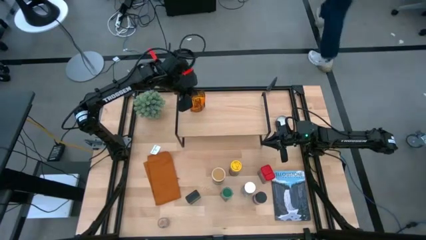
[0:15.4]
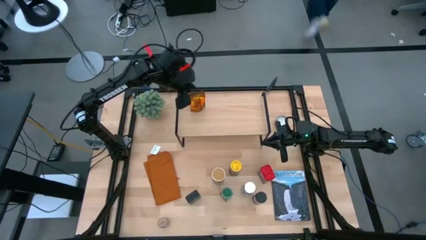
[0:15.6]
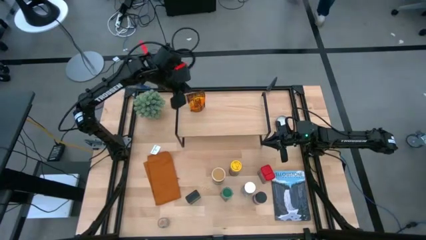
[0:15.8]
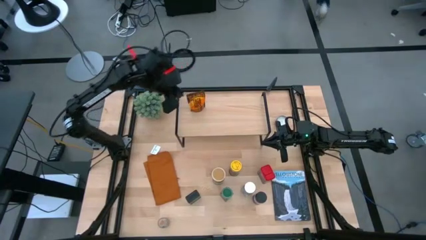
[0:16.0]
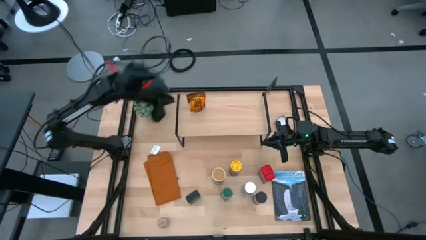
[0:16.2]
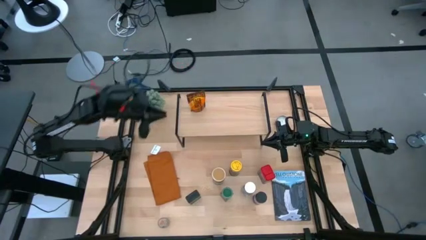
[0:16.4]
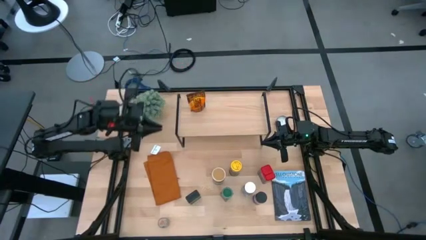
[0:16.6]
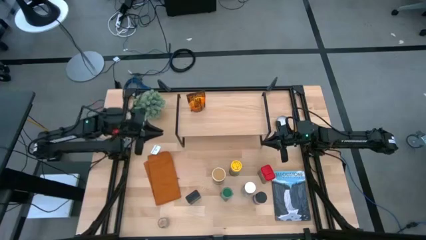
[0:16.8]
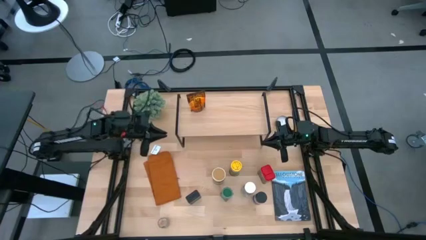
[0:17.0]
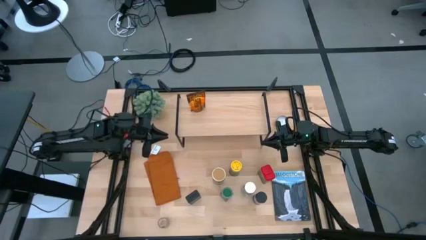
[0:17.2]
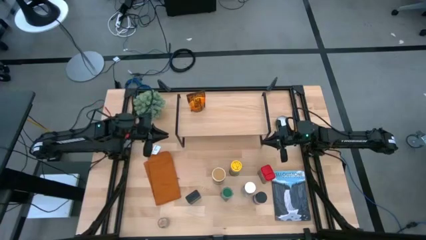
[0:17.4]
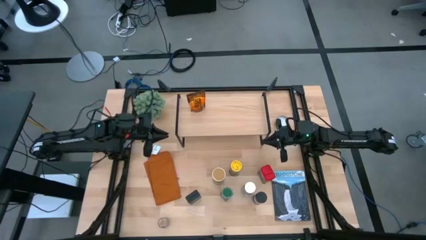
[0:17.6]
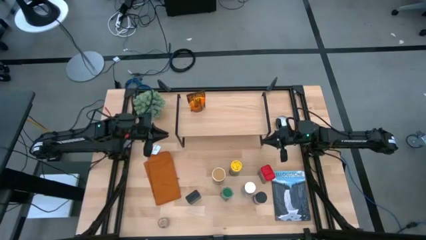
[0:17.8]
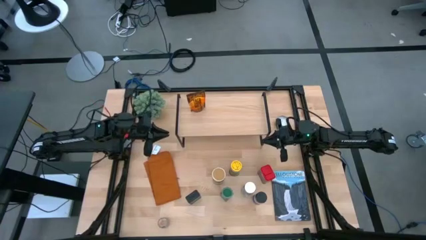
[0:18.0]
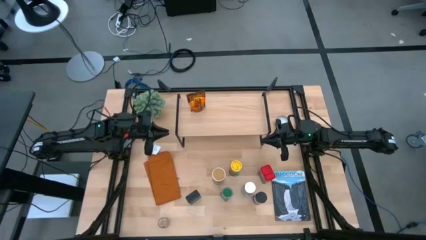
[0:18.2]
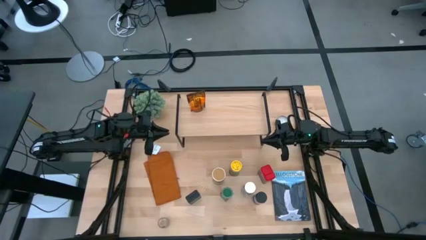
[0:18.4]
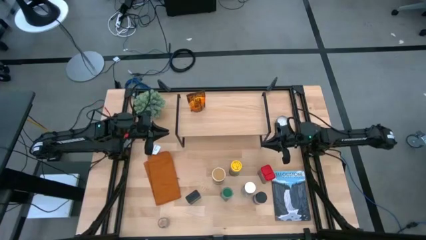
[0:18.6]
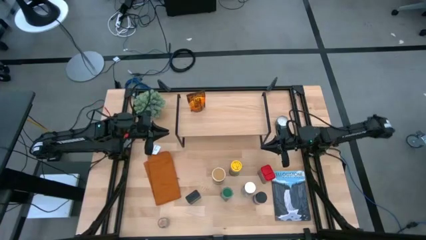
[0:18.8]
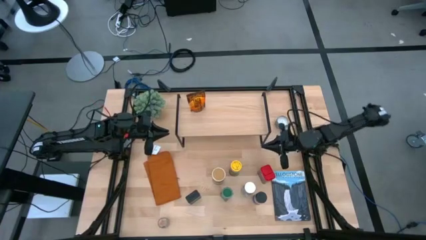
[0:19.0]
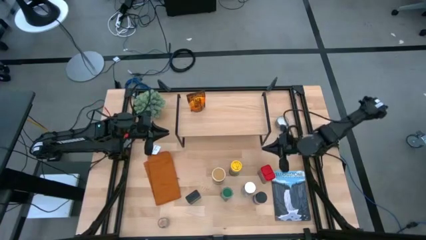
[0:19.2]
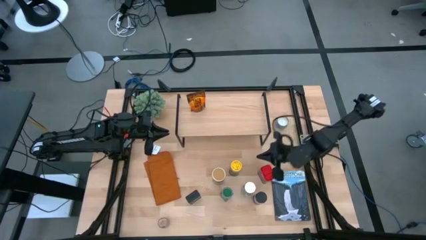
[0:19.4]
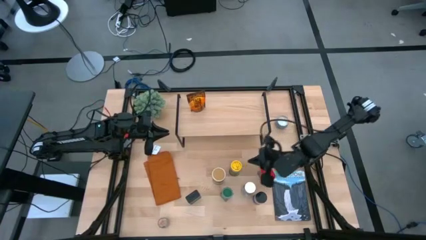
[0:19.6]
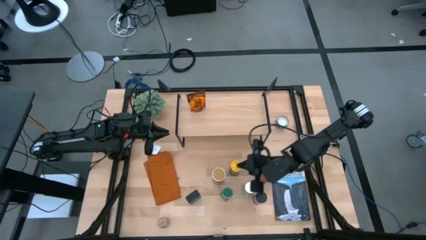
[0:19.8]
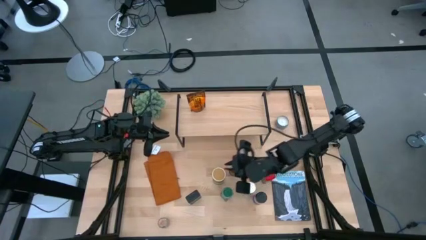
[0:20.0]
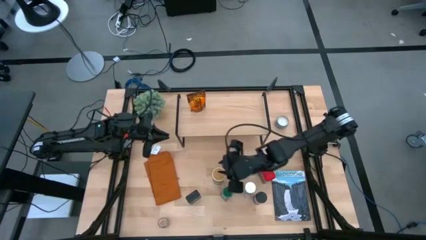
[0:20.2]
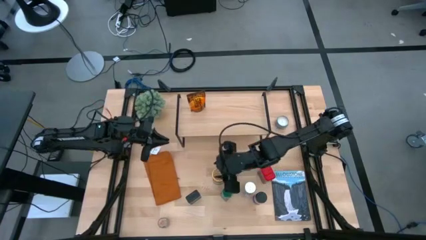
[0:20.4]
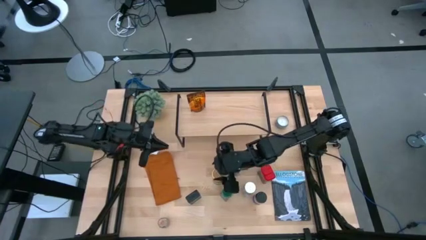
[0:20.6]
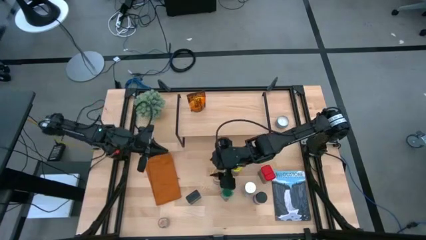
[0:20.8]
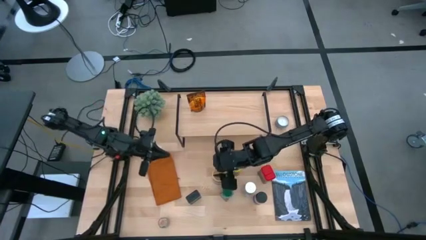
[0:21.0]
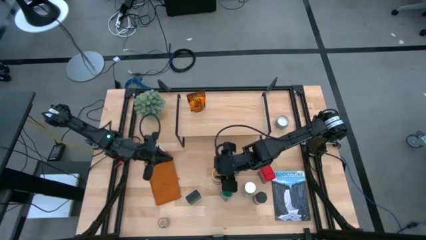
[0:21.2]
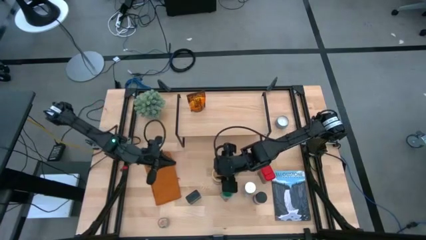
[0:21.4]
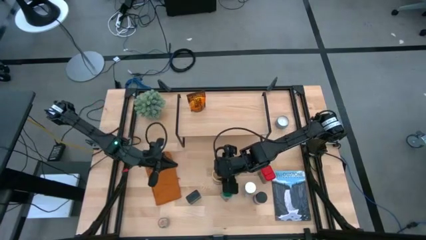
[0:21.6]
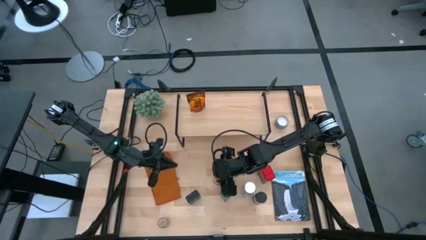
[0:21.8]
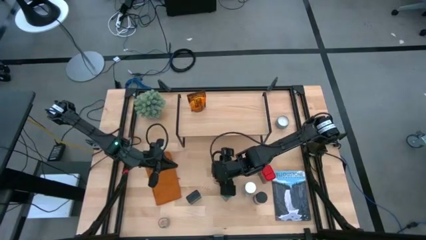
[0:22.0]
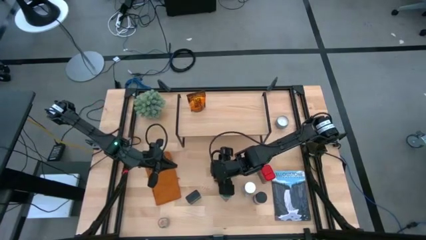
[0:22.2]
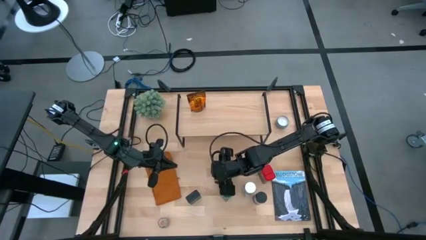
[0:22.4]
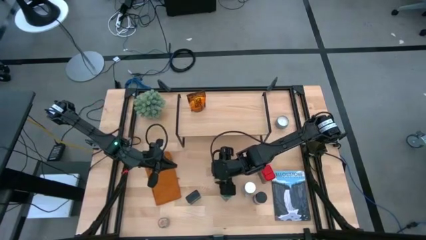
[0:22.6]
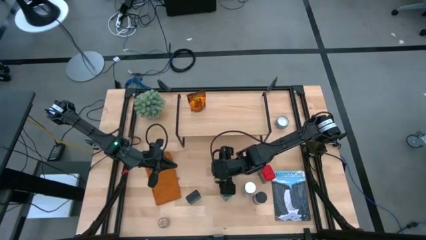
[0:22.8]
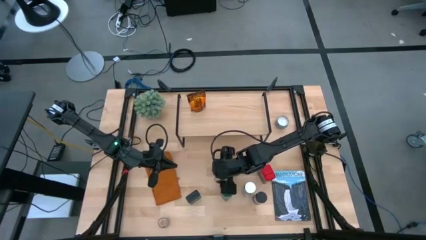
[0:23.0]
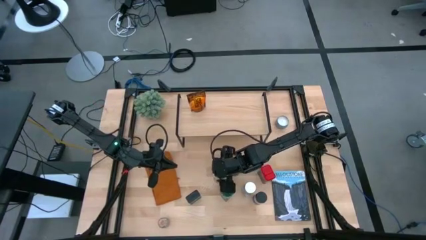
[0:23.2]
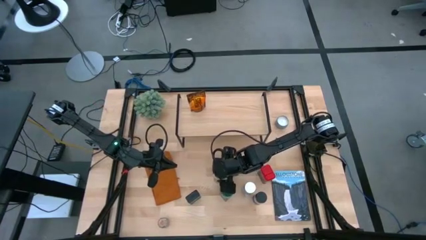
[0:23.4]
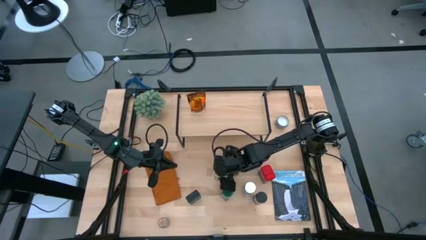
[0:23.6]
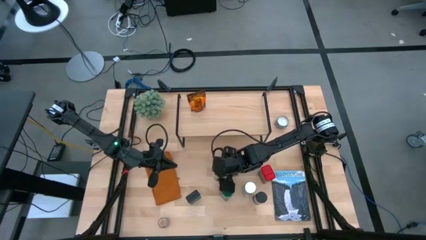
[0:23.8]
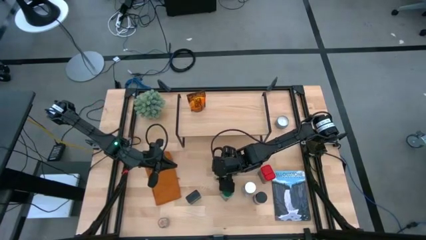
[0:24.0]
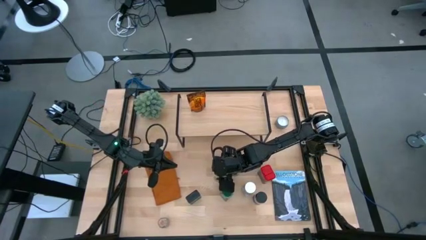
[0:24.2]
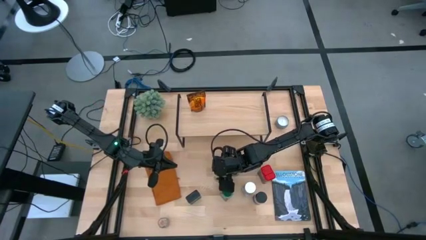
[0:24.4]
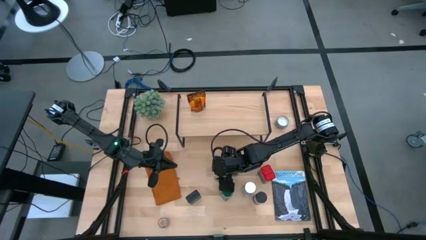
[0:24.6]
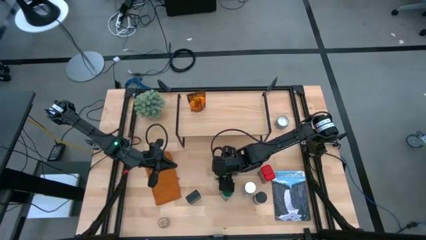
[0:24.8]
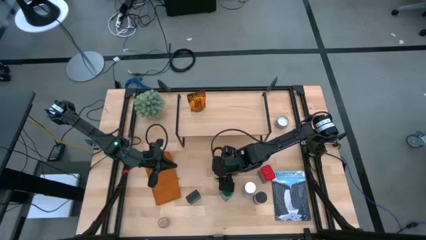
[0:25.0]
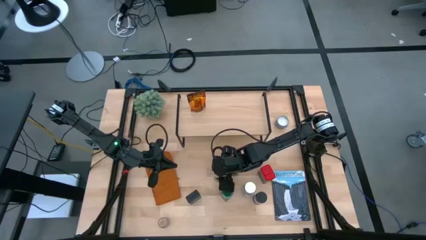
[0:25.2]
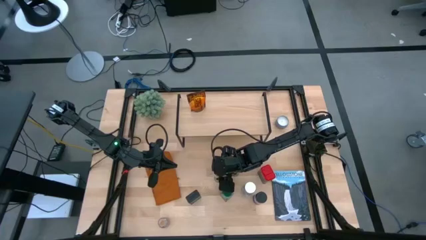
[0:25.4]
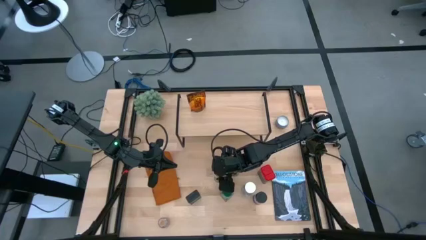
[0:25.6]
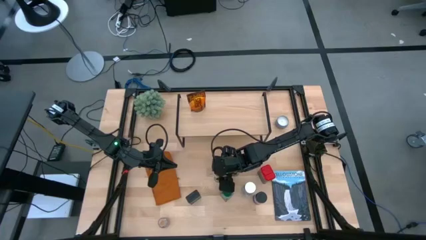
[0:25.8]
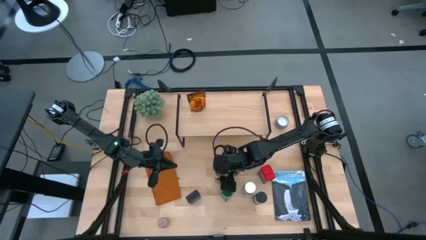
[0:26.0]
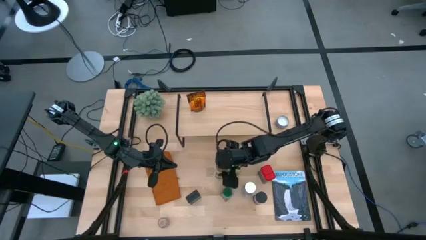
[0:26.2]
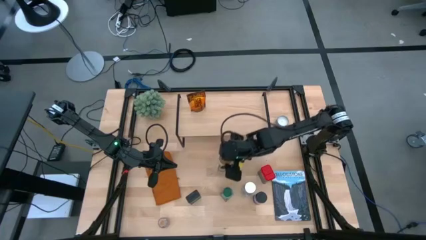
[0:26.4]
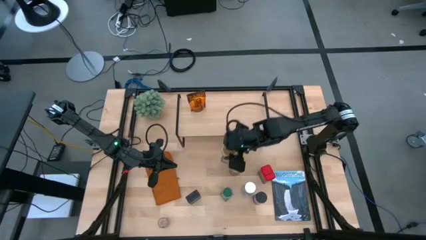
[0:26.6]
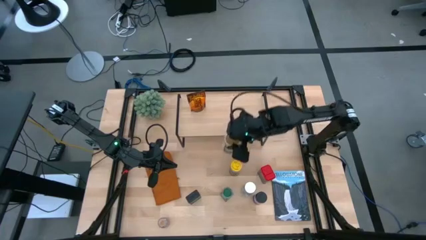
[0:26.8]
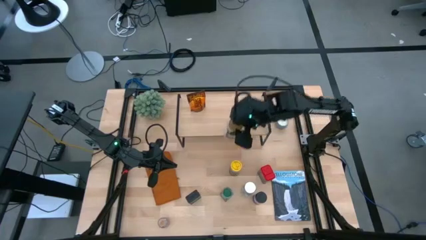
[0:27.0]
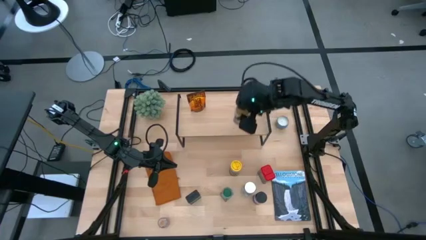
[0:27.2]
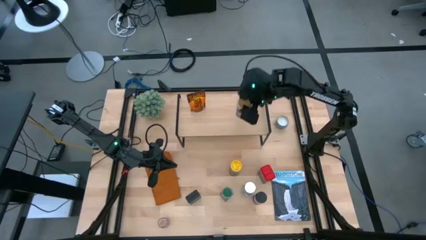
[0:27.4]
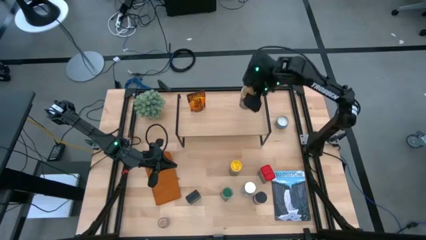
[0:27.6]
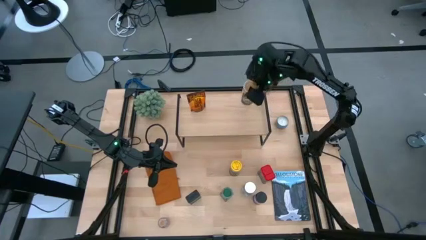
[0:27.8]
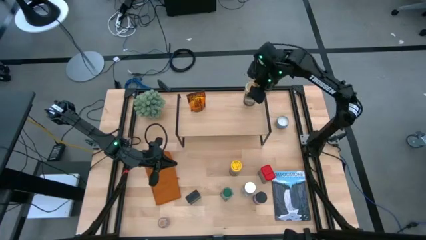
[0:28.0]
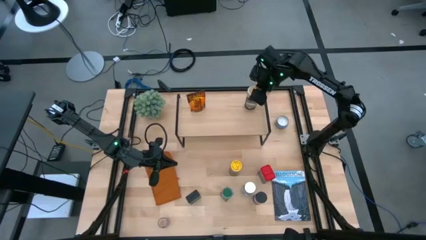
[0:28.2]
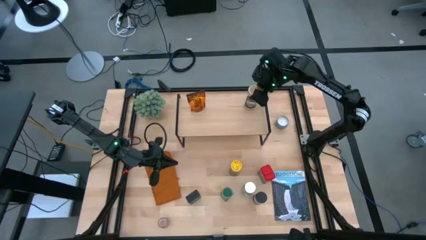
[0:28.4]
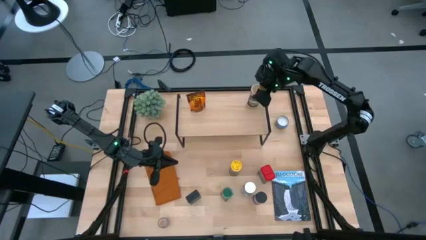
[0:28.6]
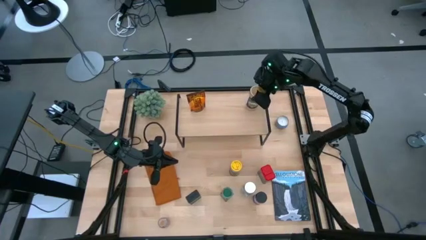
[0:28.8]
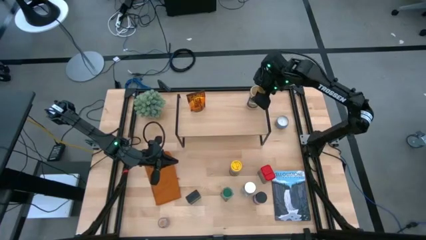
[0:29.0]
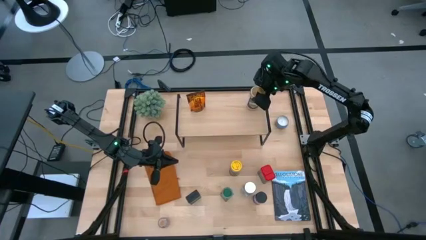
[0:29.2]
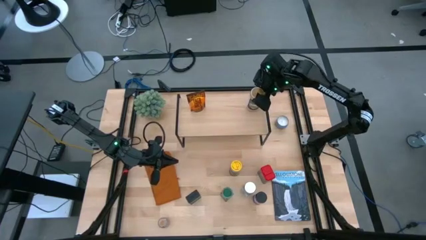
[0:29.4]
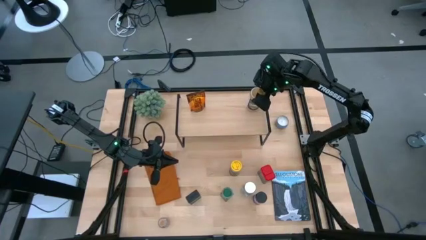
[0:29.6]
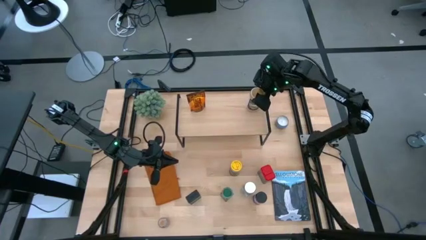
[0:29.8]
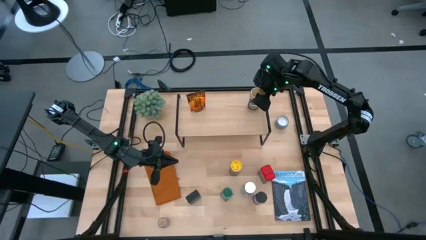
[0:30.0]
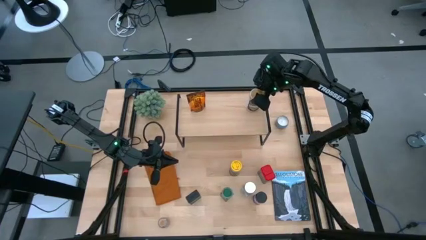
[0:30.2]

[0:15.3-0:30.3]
Task: Shelf spices
Put the golden seasoning bottle on the shelf

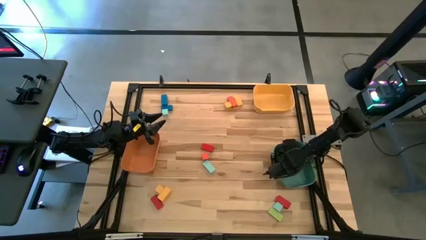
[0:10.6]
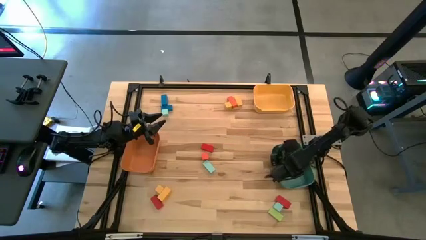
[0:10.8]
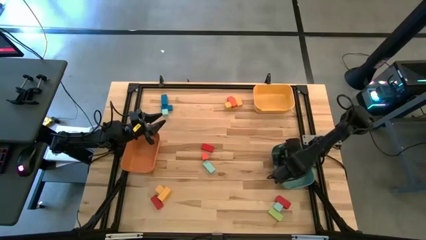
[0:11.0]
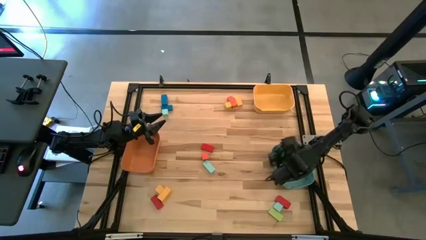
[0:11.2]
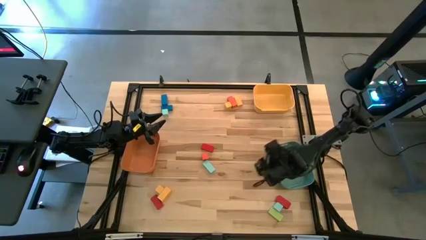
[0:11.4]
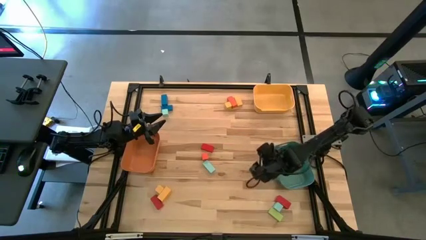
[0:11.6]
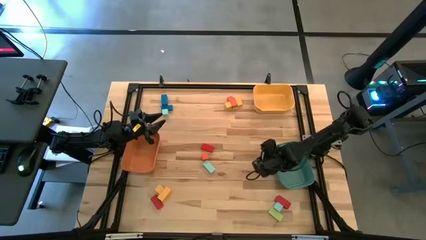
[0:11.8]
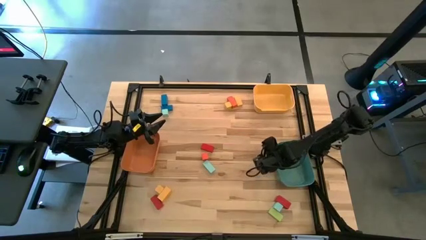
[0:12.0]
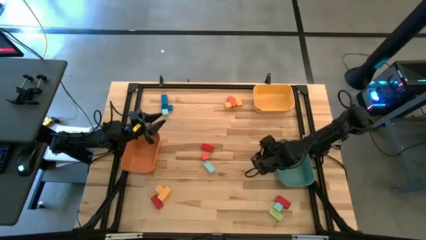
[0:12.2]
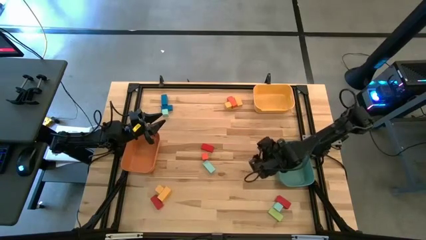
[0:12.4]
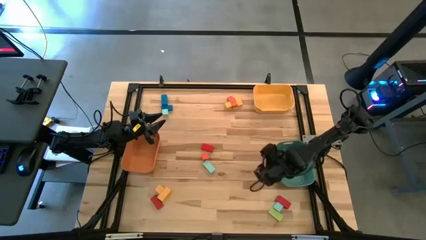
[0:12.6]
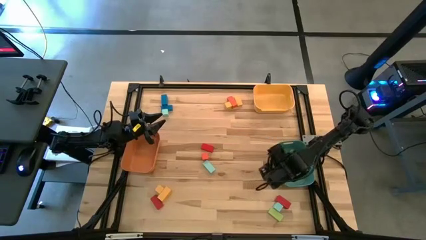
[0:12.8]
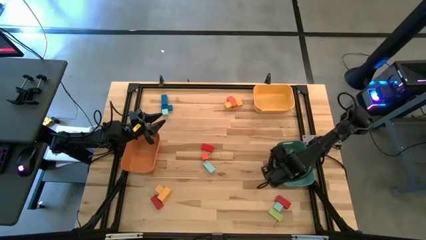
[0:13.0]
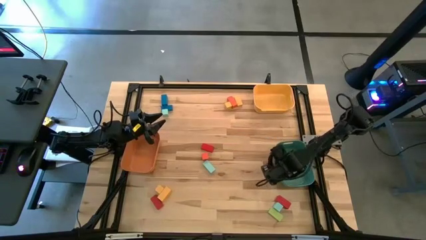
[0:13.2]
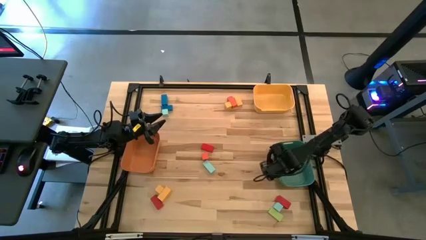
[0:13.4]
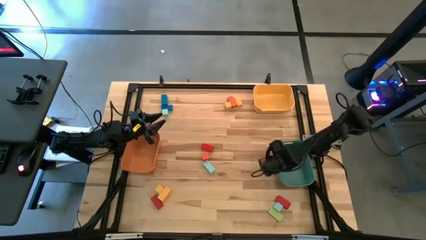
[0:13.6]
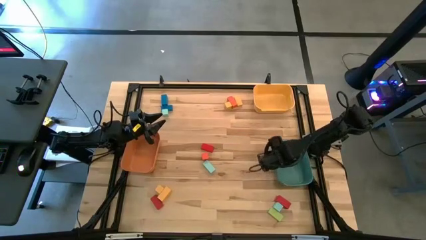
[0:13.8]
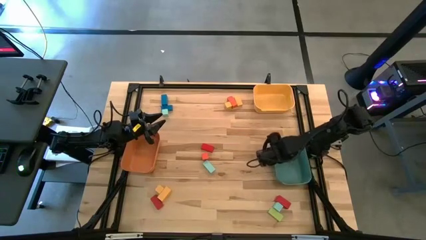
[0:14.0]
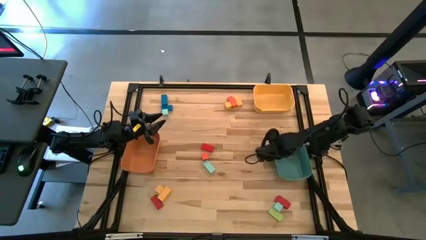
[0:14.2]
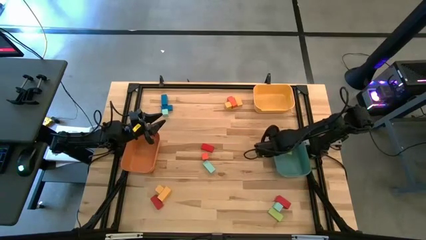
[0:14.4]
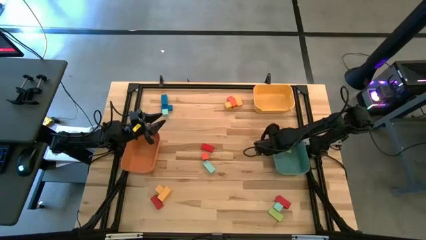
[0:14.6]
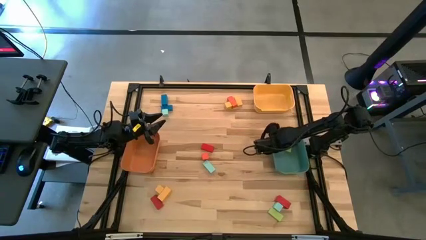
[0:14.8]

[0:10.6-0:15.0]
Task: Sort blocks by size
Adjust the green bin
